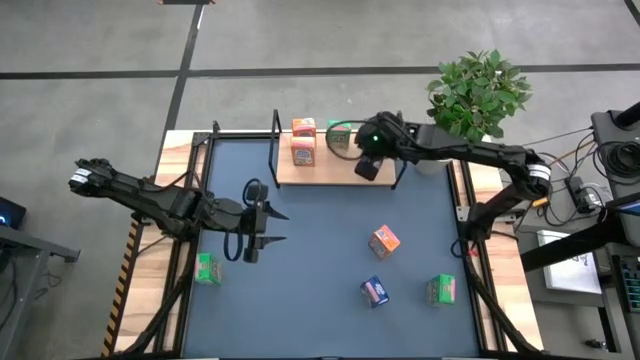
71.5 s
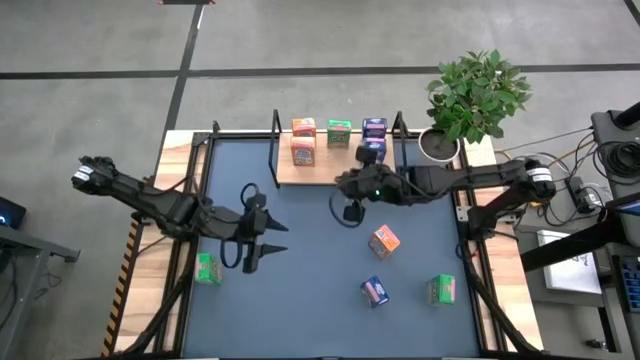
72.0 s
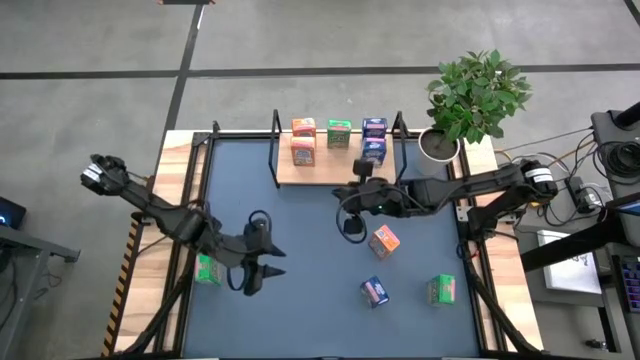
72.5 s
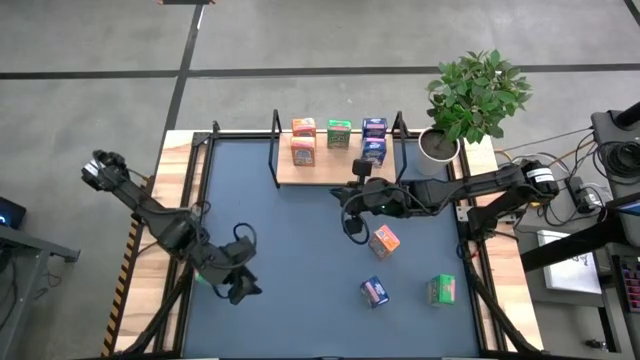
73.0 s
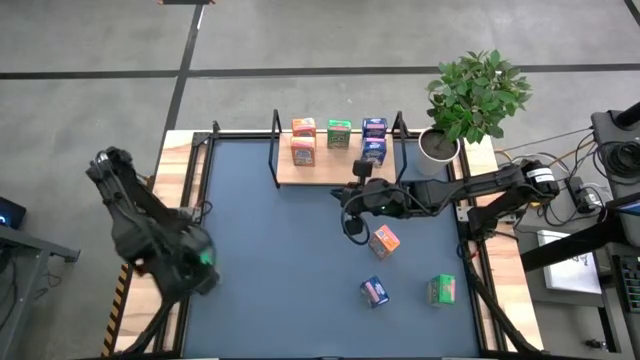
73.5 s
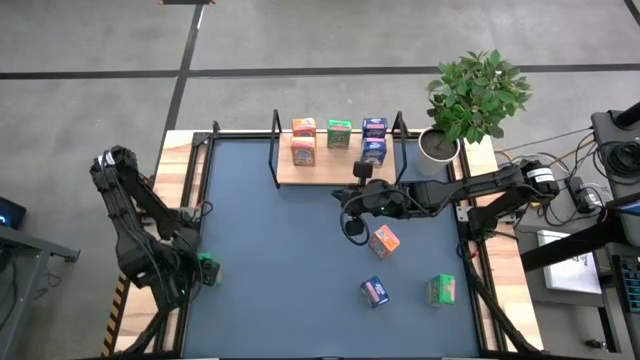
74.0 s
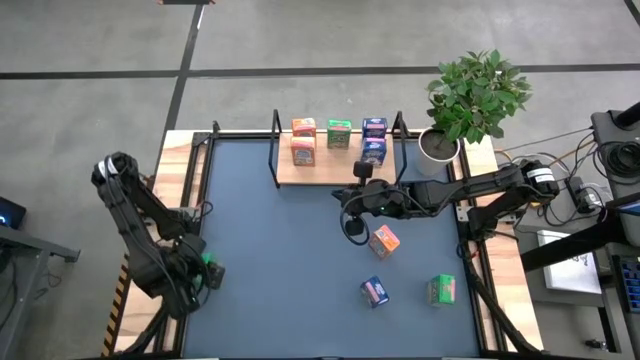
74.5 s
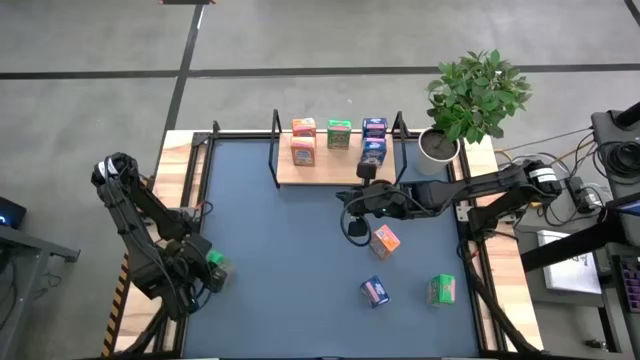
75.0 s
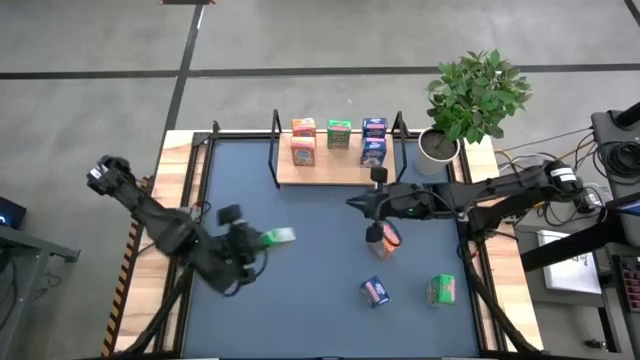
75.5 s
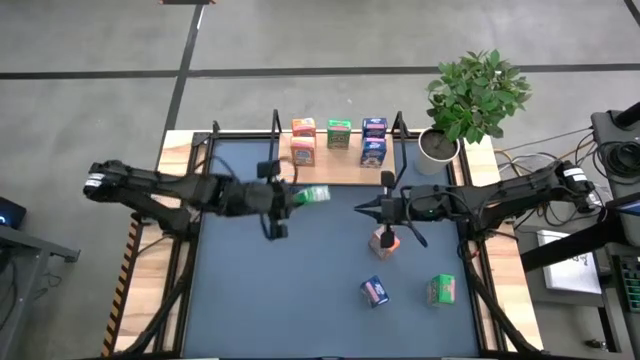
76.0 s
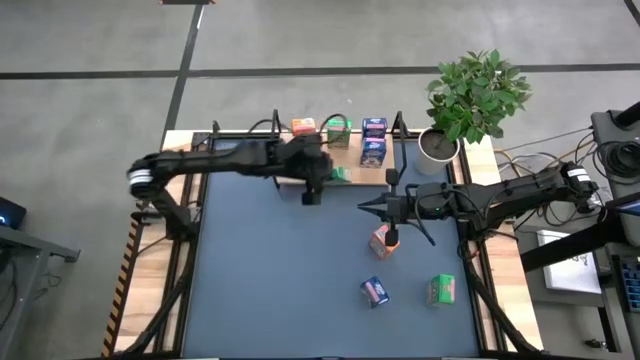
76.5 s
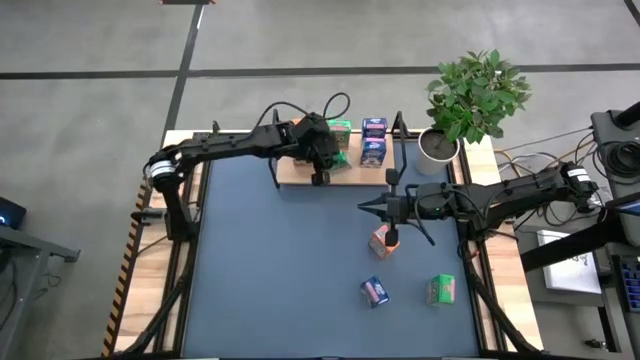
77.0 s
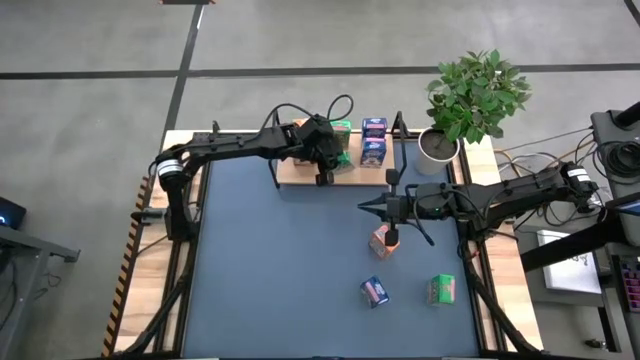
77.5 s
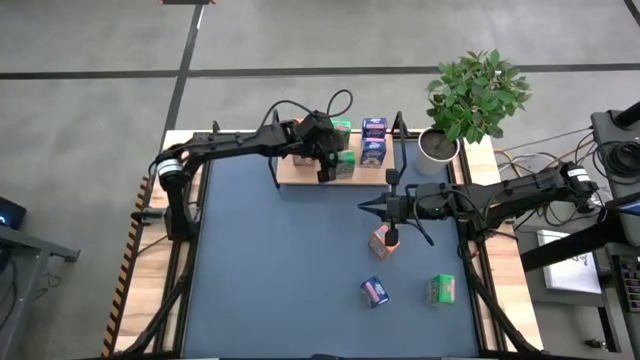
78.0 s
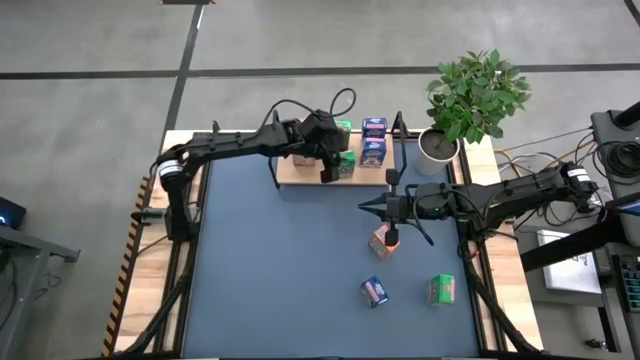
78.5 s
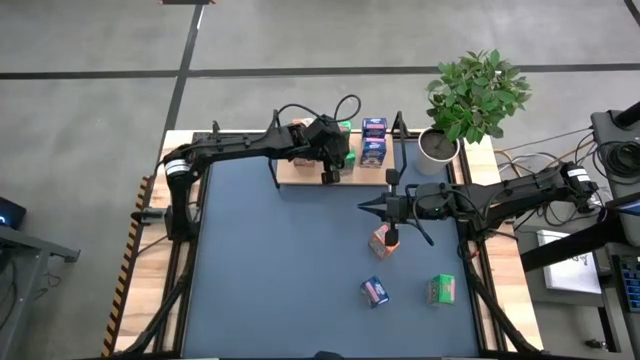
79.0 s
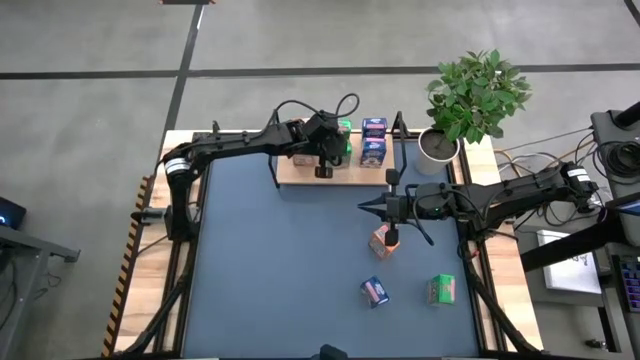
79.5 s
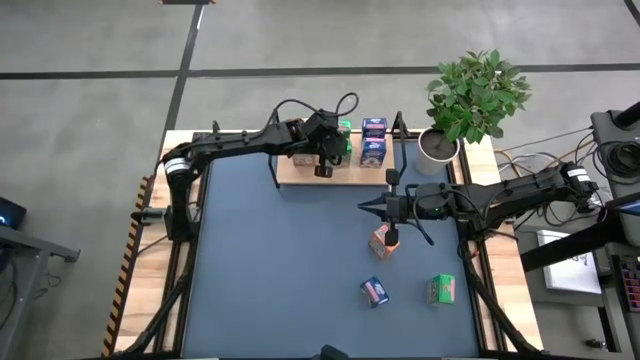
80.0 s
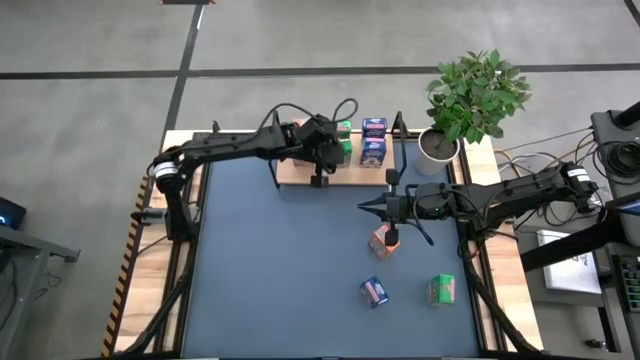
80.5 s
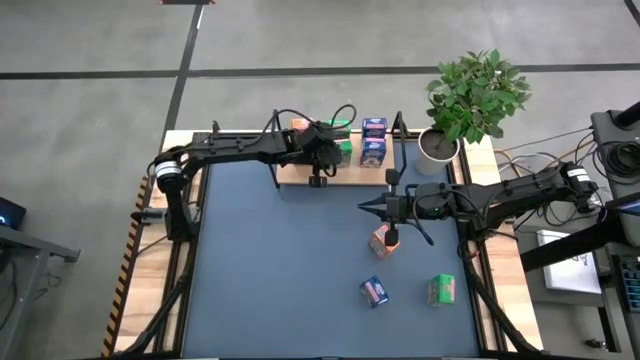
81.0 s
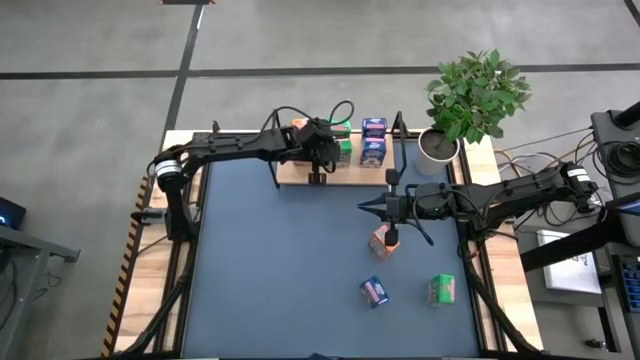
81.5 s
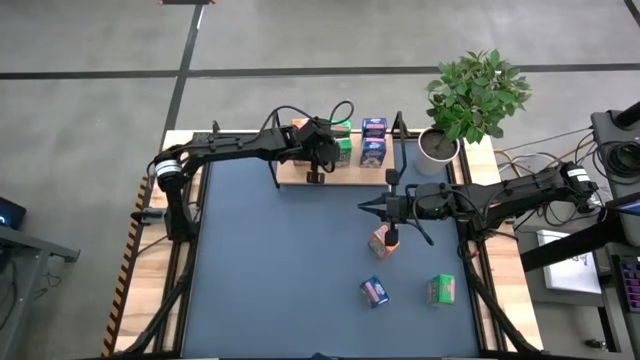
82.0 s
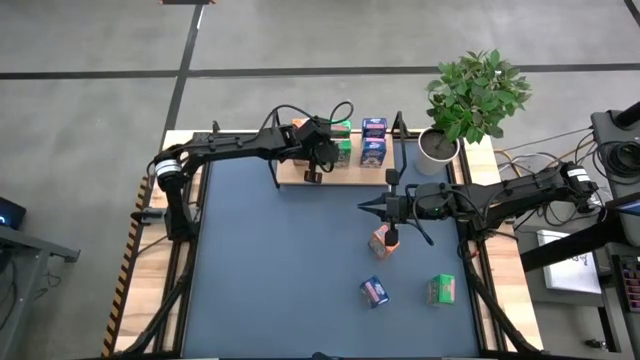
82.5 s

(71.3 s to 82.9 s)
Task: Stack cereal on shelf
Put the left green cereal box on the shelf

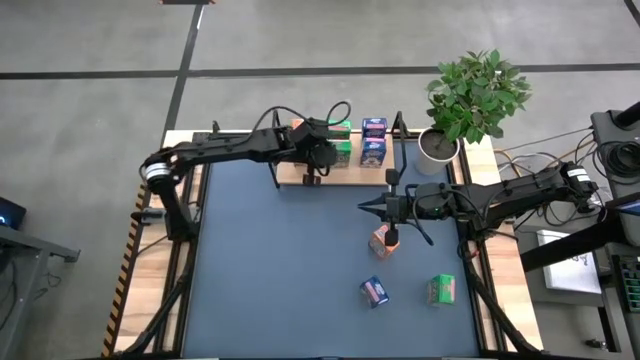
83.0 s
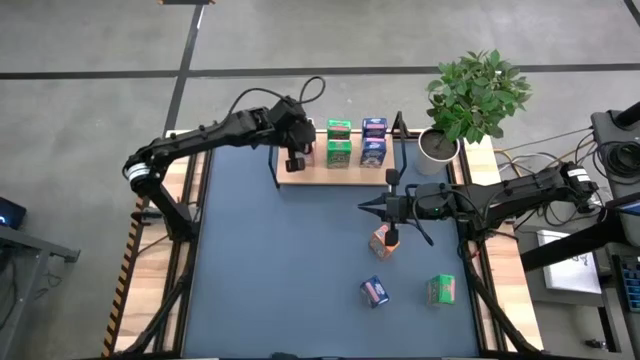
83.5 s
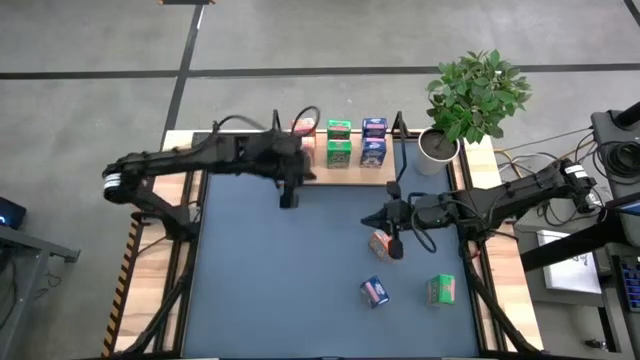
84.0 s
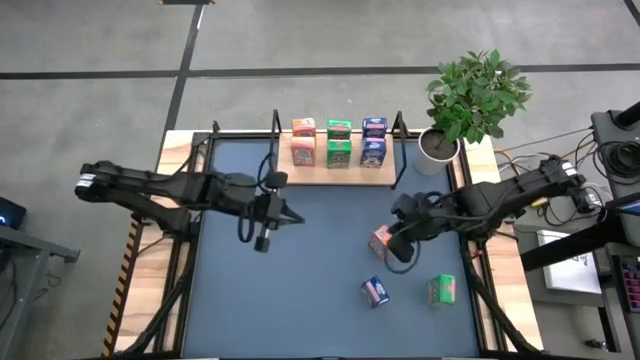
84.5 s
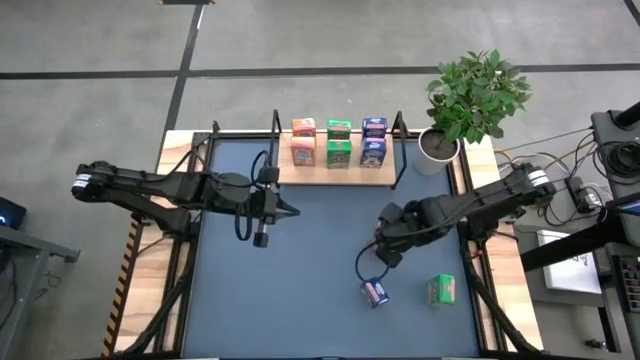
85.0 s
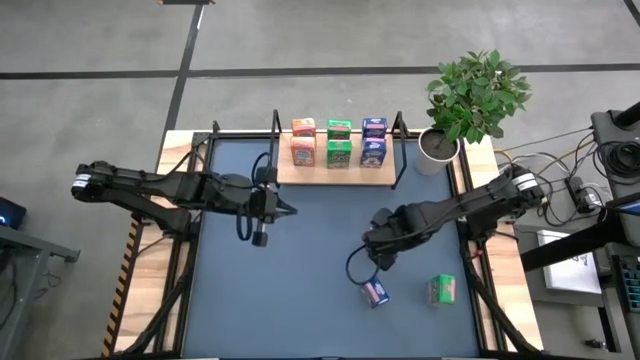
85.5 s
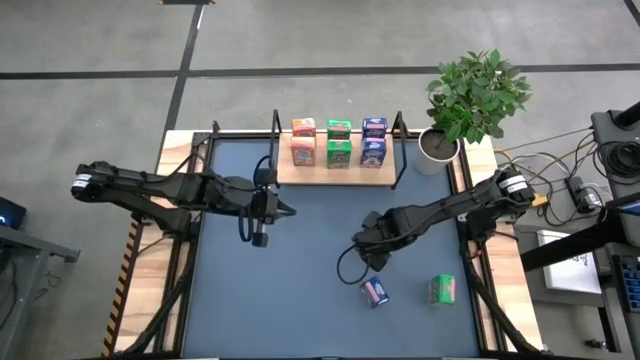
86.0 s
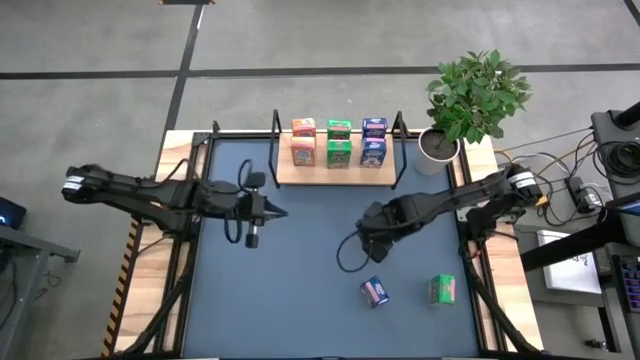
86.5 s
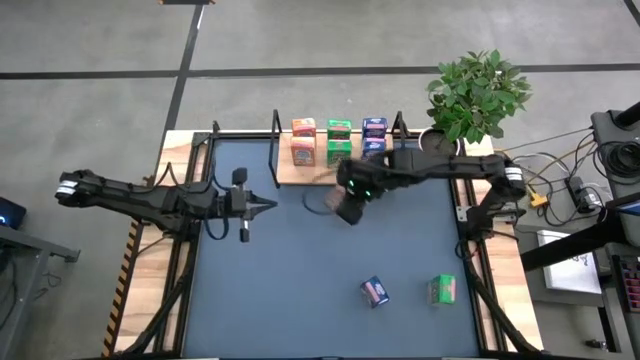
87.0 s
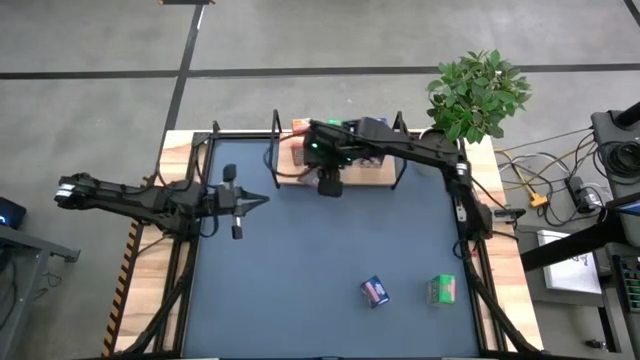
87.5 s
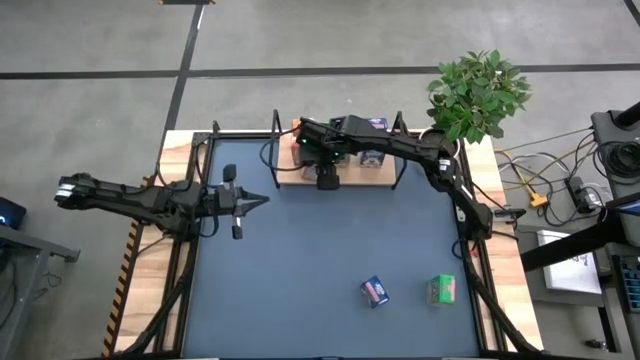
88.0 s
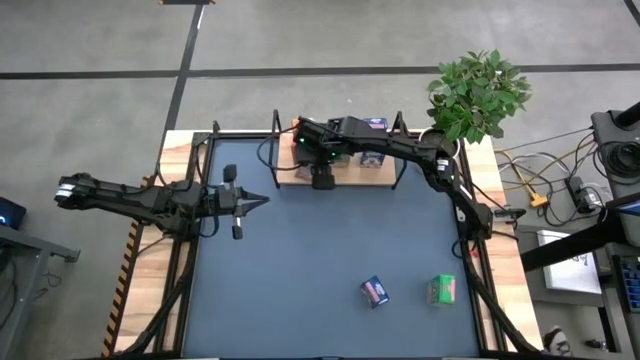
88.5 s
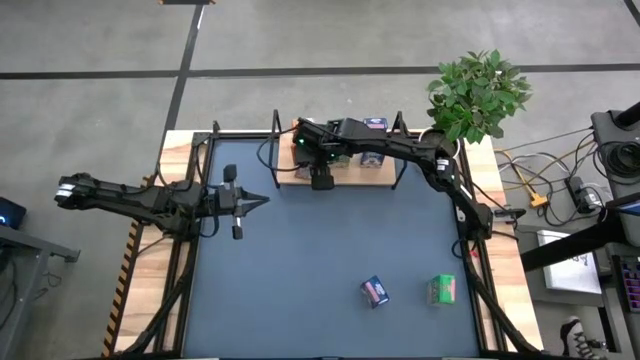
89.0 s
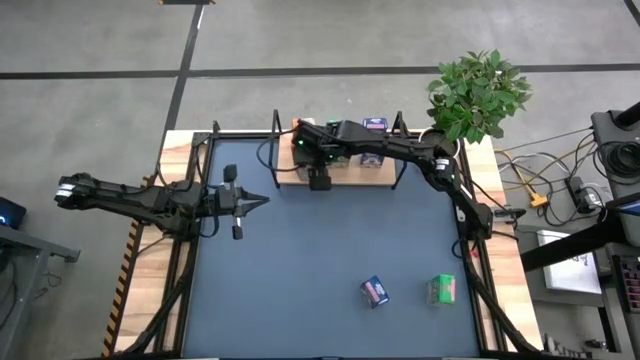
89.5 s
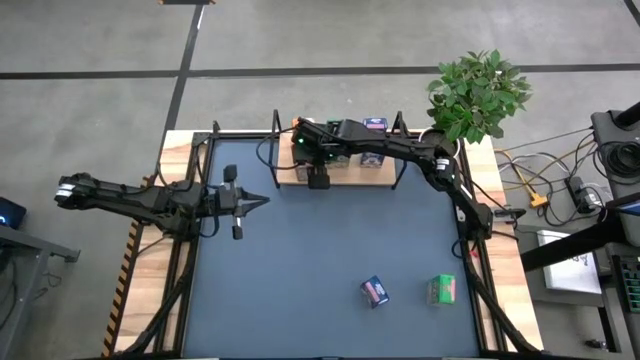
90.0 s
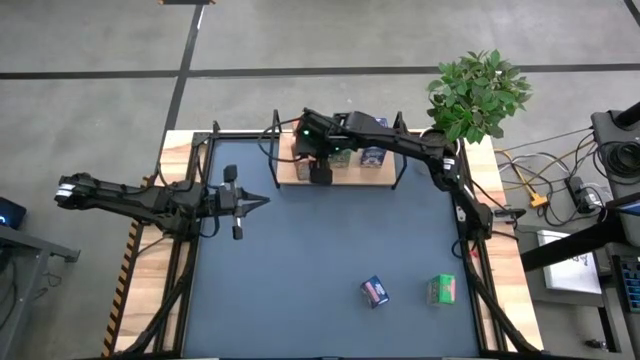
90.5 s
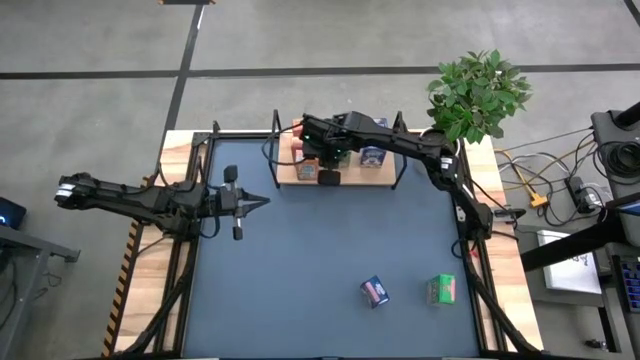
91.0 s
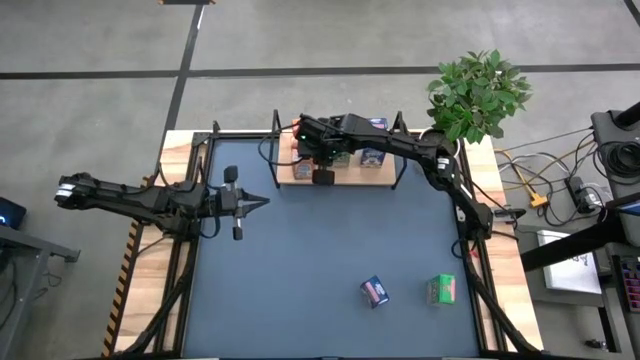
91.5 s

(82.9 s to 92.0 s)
Put the orange cereal box on the shelf

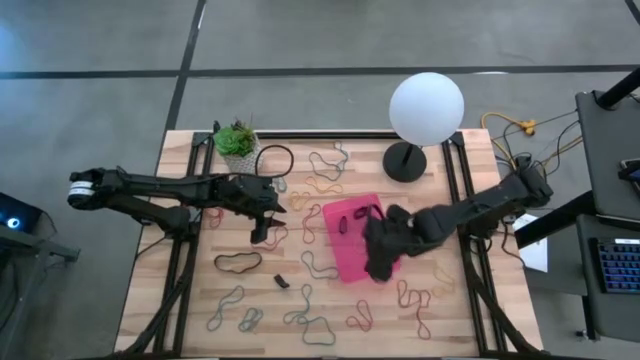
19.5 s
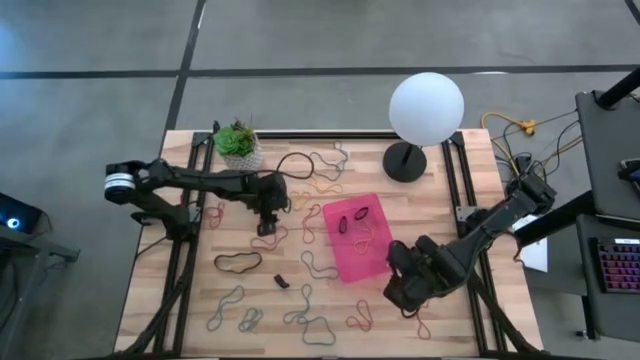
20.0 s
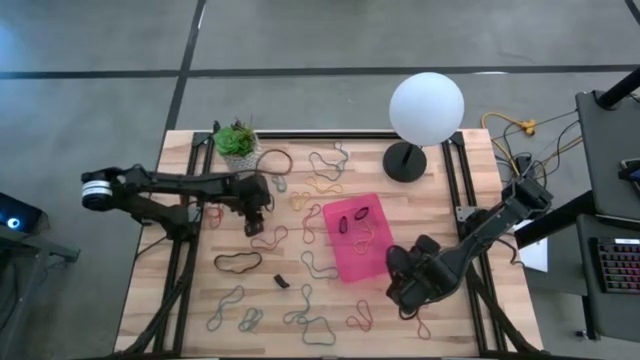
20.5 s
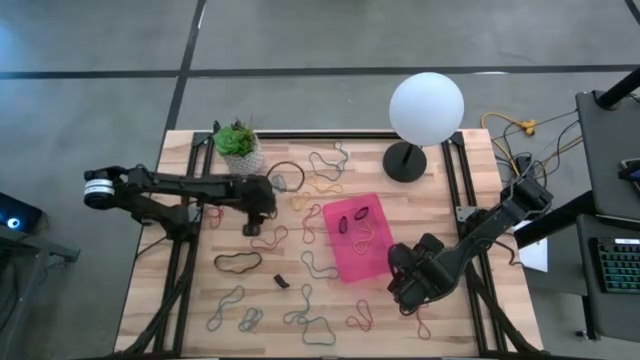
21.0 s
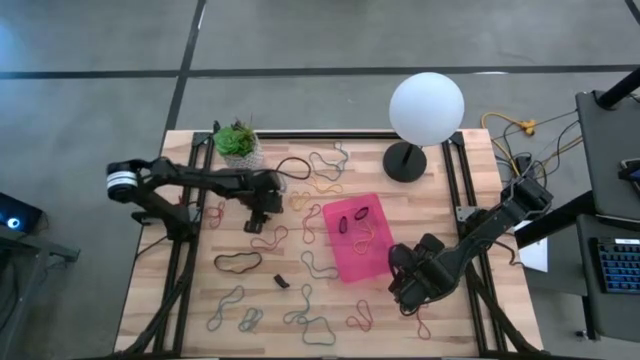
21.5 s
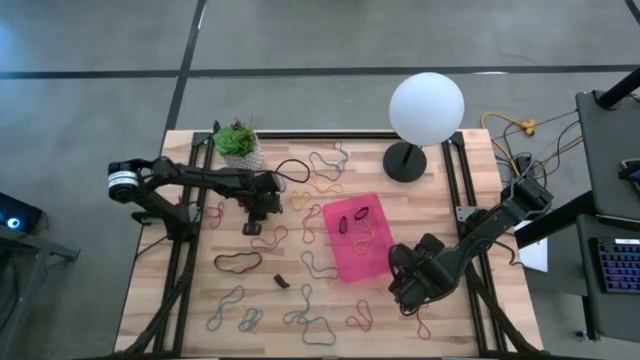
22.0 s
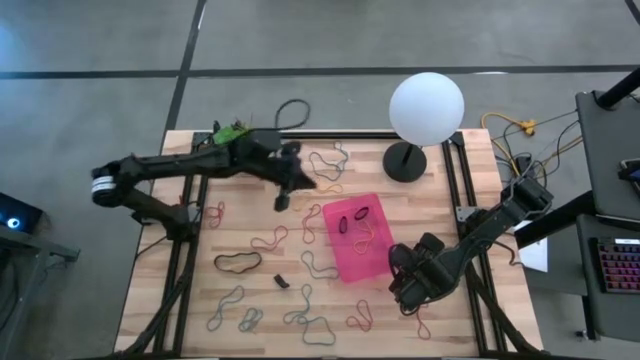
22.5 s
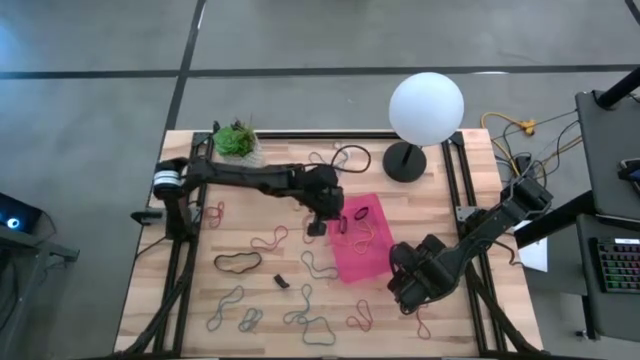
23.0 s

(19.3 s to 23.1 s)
Task: Pick and place rubber bands into bin
Put the yellow rubber band into the pink bin
